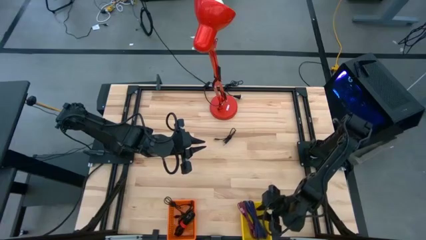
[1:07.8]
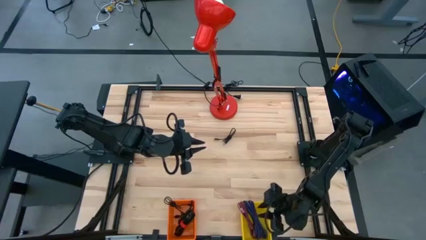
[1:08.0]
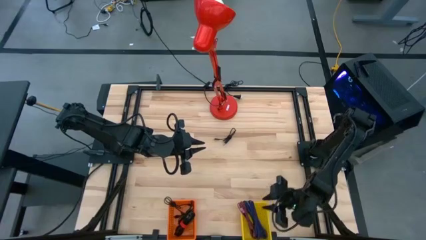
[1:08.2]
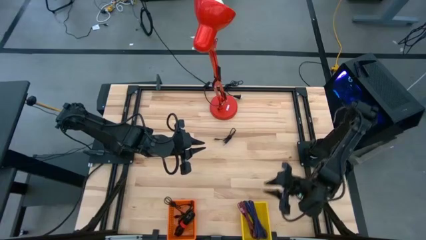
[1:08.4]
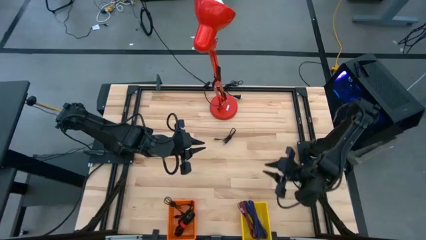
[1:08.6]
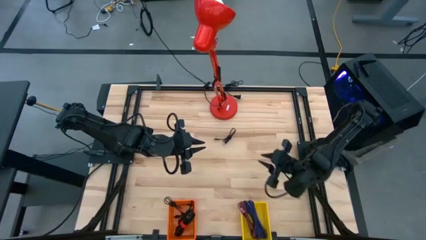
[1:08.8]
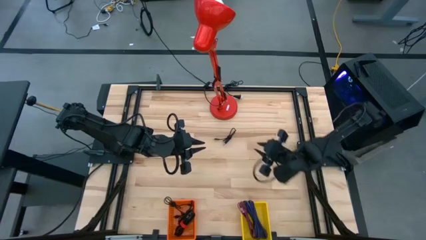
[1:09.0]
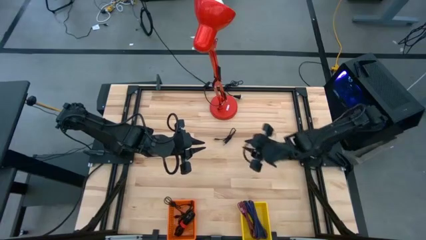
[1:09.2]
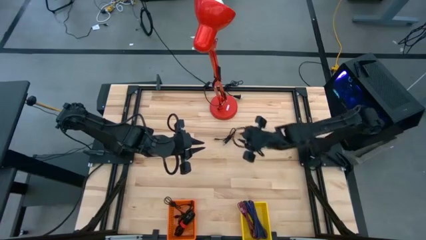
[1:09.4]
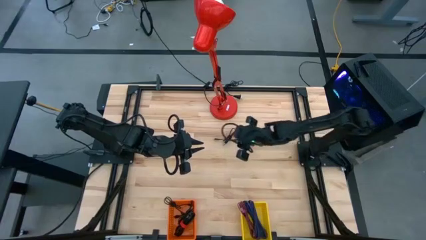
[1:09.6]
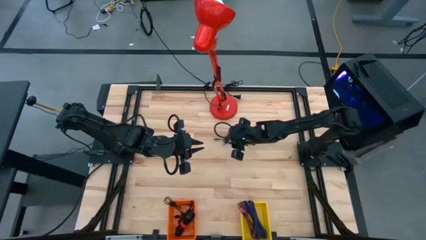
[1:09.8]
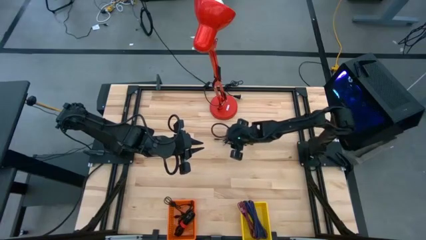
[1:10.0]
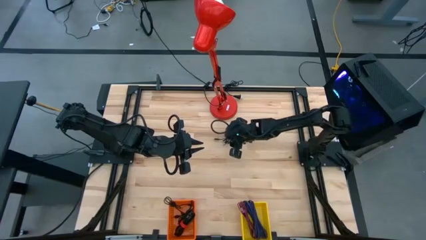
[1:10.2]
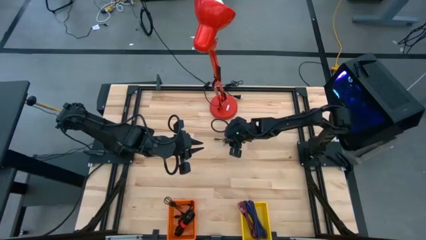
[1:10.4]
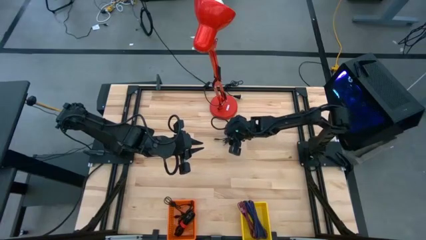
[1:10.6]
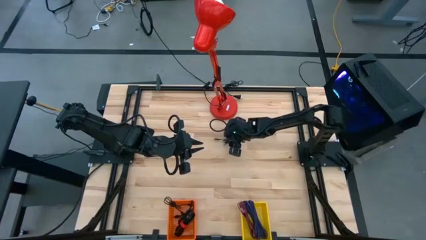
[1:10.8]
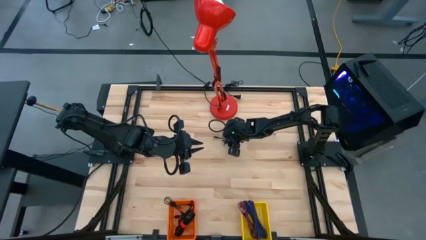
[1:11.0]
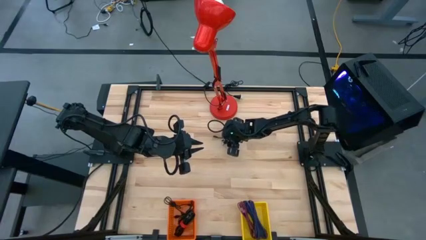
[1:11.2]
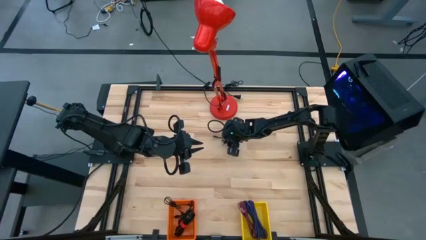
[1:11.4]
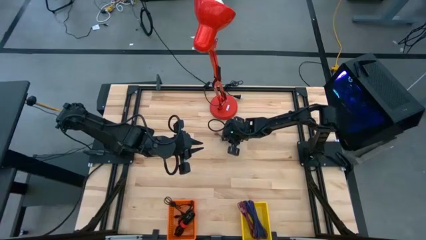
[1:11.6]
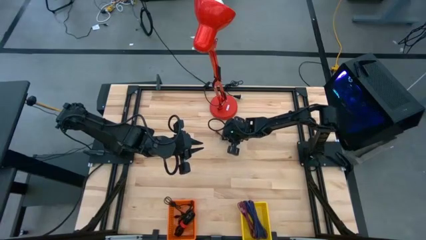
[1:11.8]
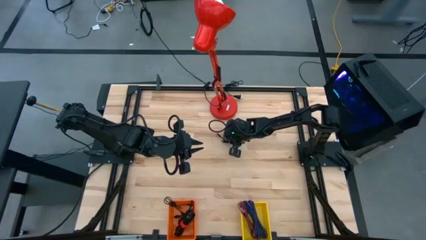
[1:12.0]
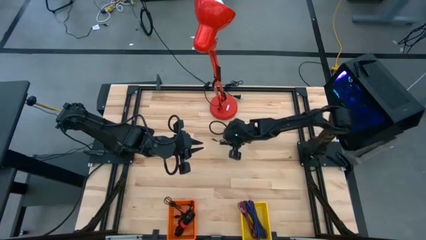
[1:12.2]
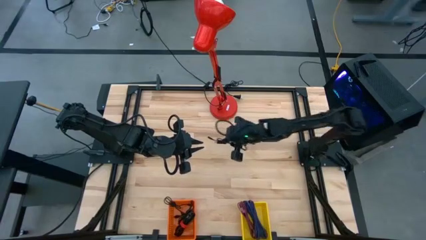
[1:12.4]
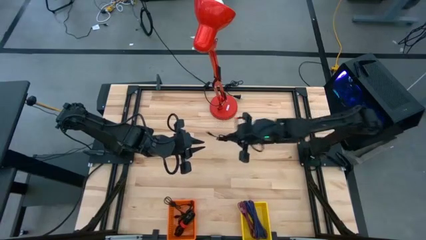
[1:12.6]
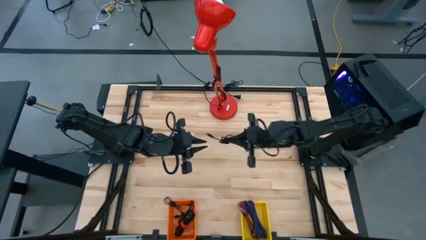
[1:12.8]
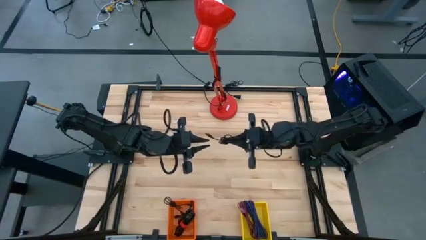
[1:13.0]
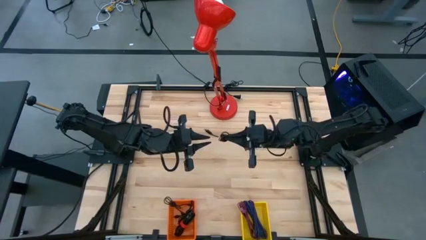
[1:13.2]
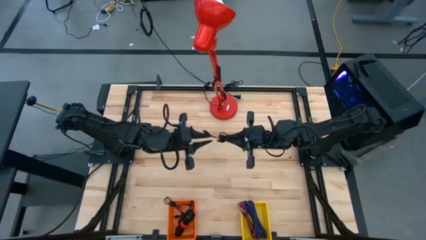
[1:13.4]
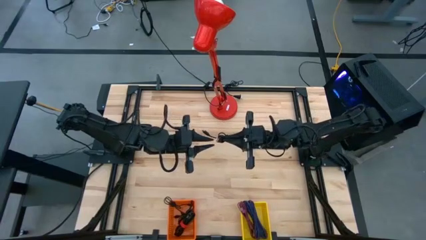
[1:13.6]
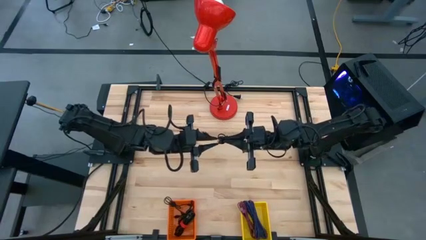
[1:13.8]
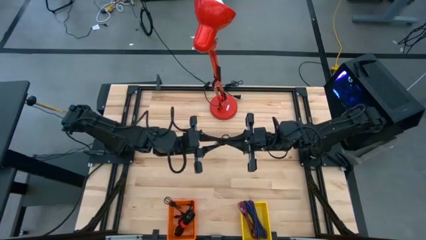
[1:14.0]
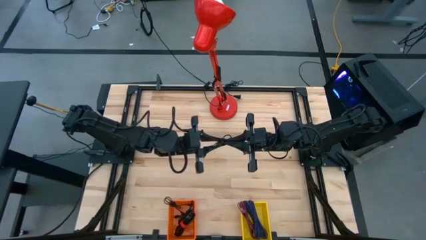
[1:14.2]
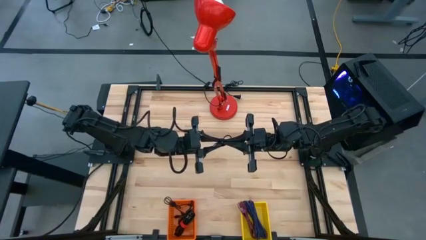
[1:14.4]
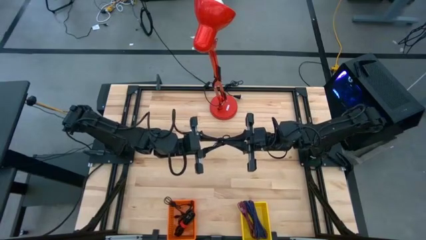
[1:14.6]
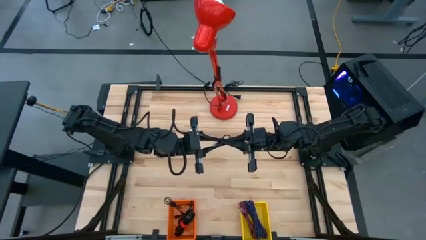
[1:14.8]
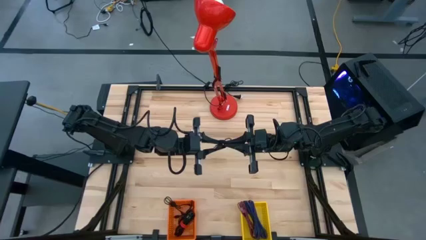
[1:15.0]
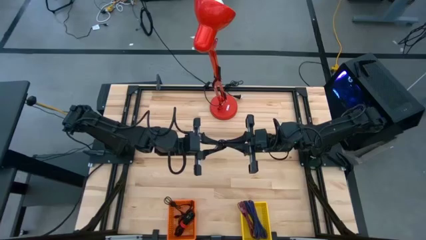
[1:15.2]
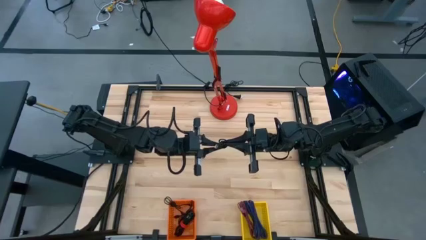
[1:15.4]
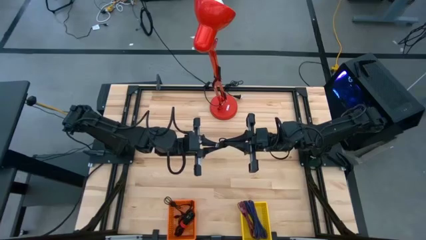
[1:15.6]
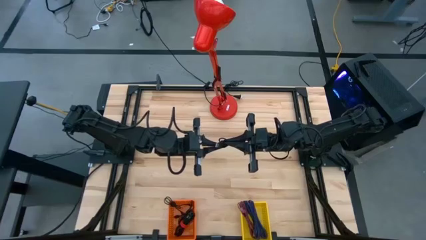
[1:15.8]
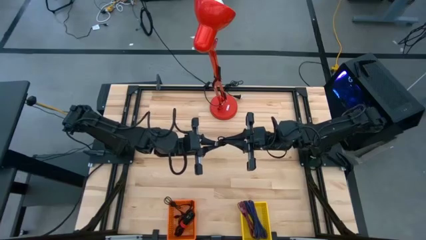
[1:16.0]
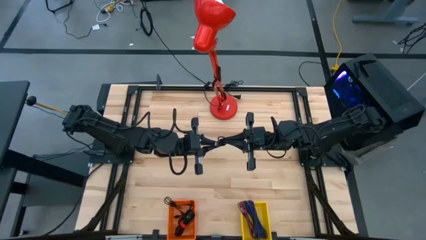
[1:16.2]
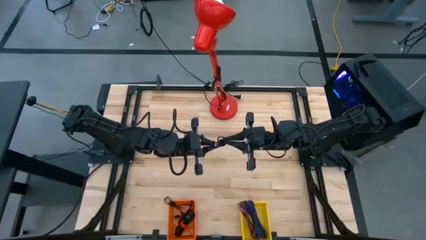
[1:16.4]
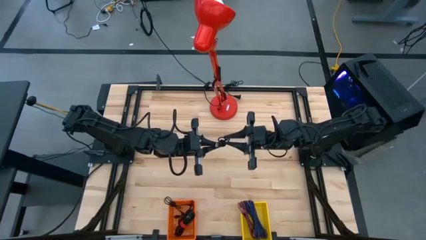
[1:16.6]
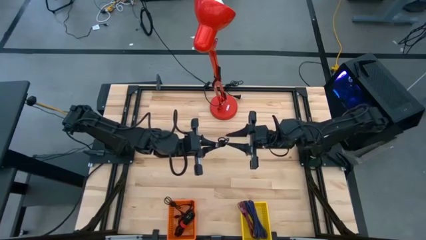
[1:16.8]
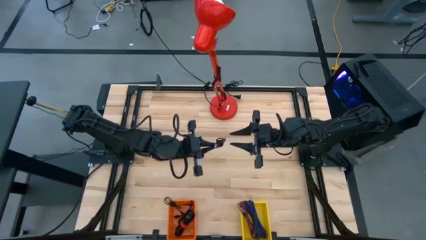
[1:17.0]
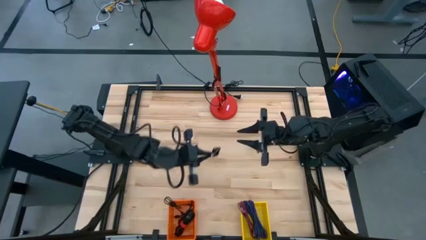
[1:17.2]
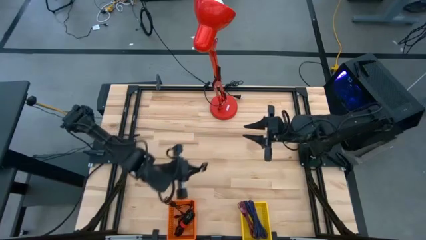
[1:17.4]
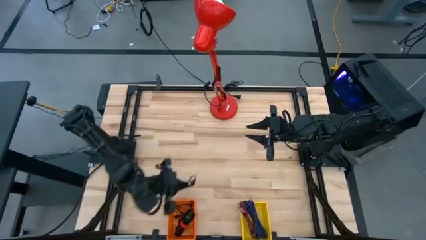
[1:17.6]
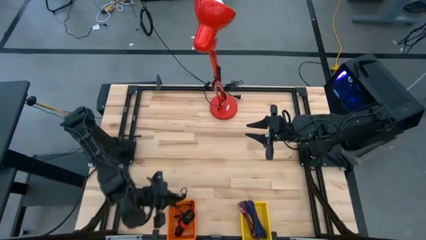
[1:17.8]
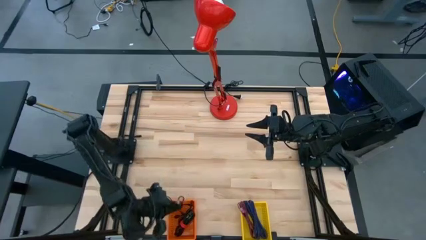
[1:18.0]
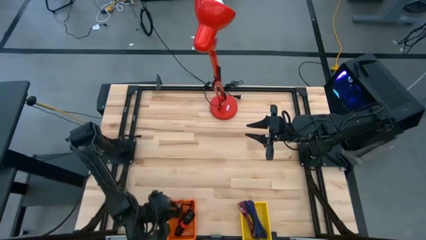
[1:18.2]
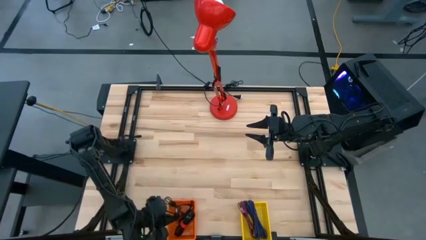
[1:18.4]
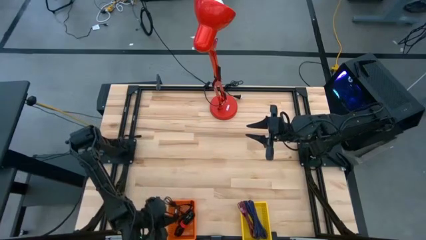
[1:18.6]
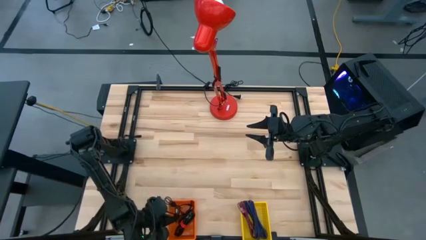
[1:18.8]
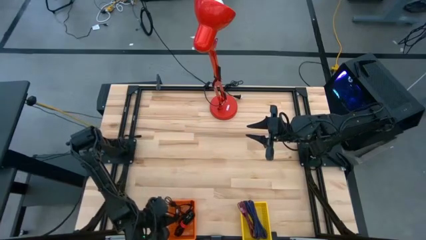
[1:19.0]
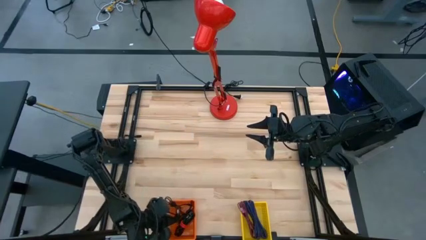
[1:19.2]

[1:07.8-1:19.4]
Task: Pick & Place USB Port
Put the black charger cable into the orange bin

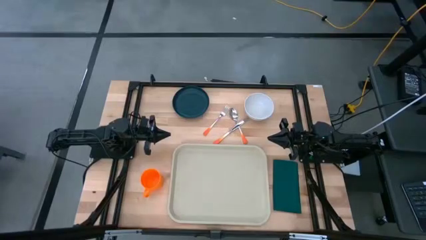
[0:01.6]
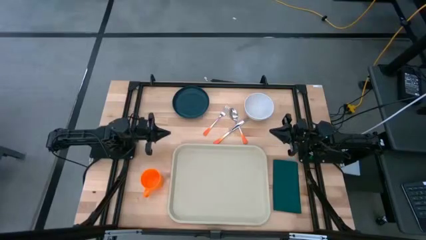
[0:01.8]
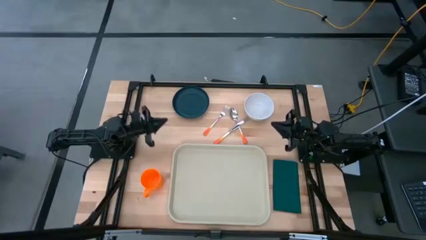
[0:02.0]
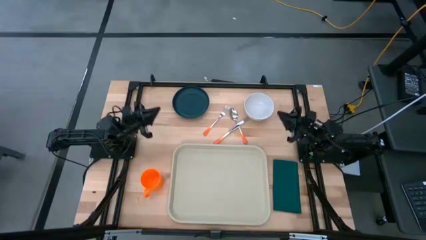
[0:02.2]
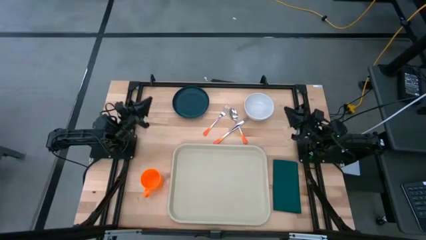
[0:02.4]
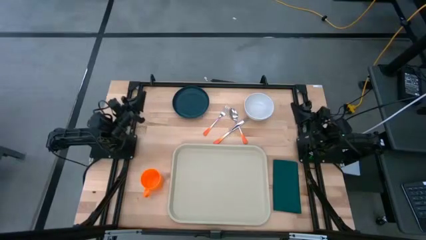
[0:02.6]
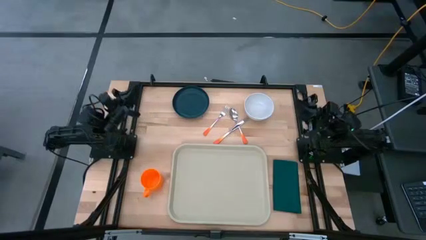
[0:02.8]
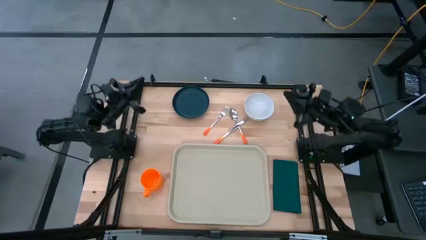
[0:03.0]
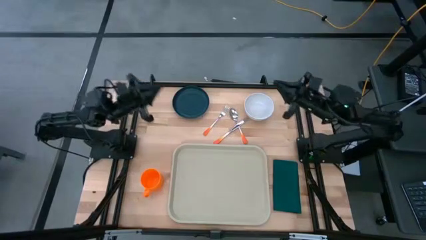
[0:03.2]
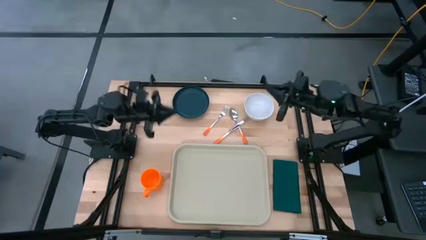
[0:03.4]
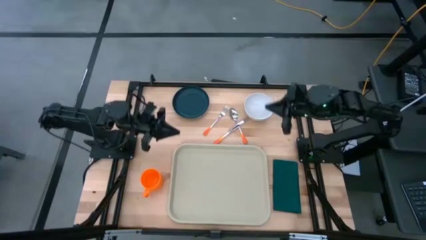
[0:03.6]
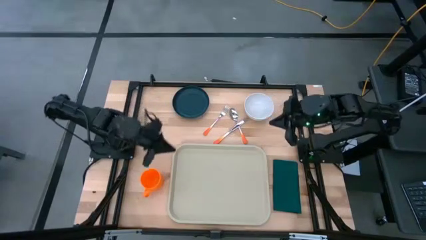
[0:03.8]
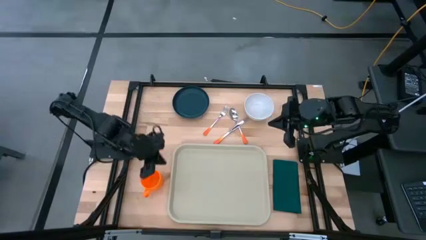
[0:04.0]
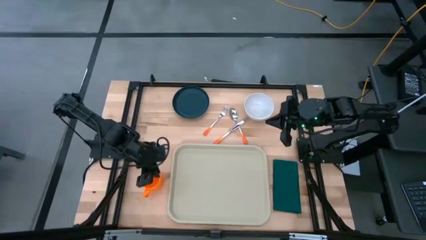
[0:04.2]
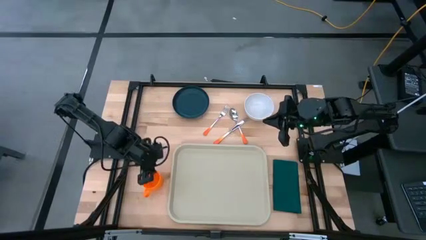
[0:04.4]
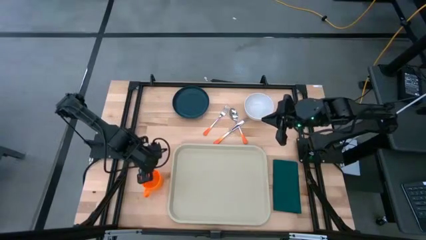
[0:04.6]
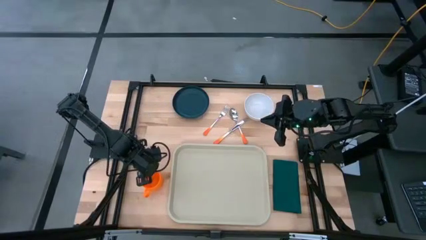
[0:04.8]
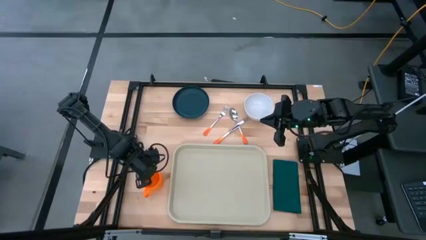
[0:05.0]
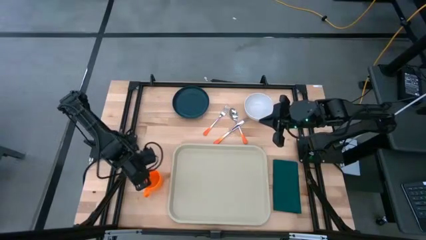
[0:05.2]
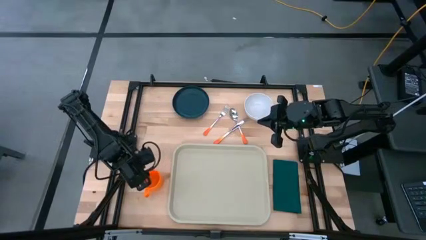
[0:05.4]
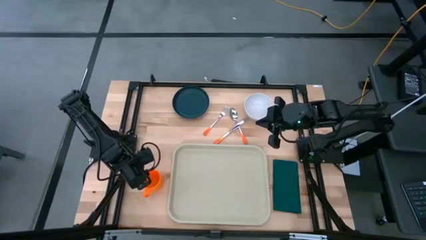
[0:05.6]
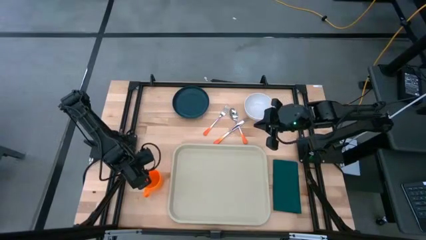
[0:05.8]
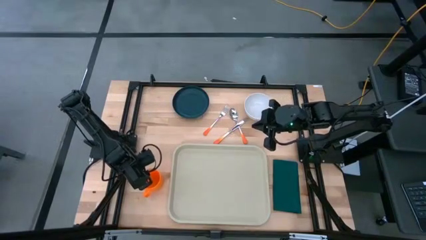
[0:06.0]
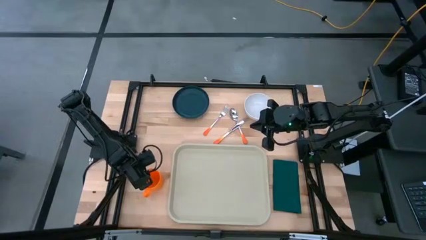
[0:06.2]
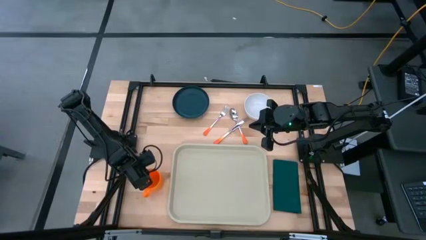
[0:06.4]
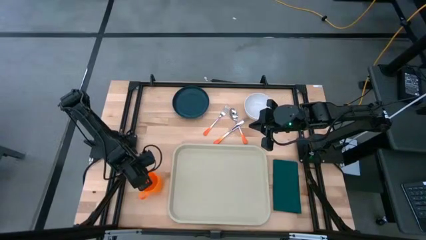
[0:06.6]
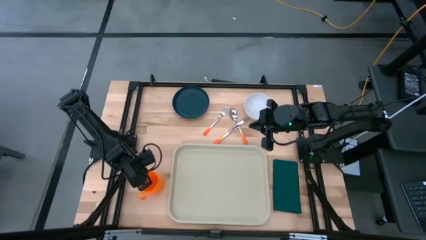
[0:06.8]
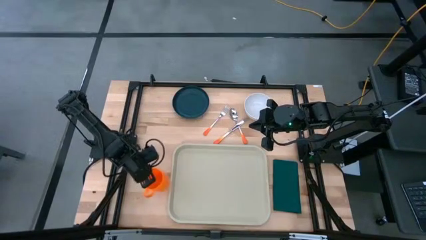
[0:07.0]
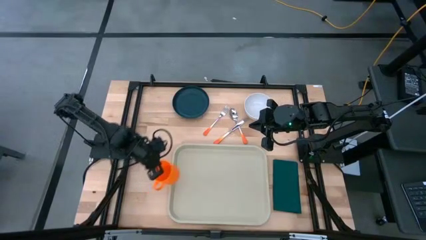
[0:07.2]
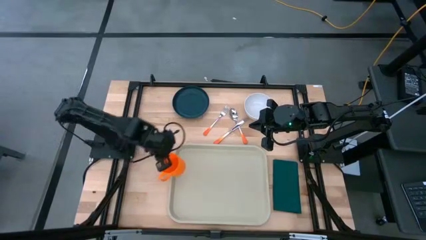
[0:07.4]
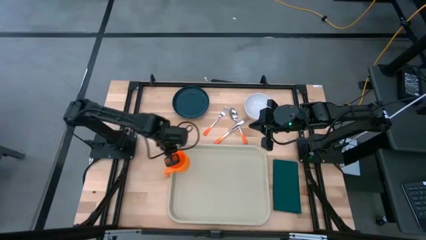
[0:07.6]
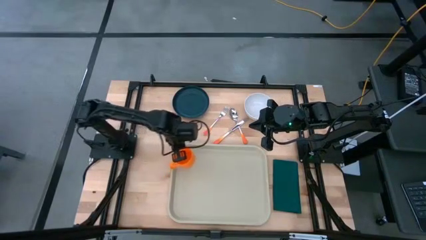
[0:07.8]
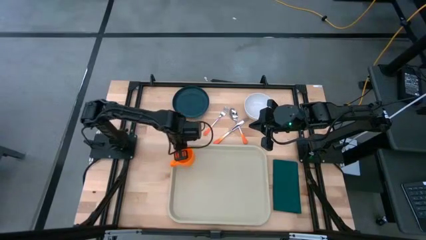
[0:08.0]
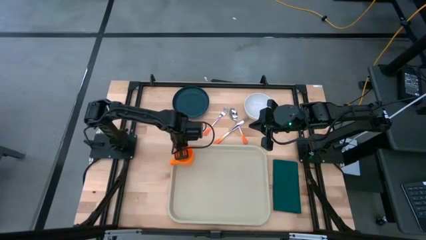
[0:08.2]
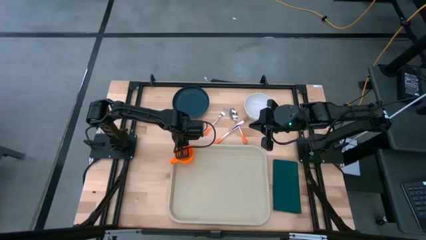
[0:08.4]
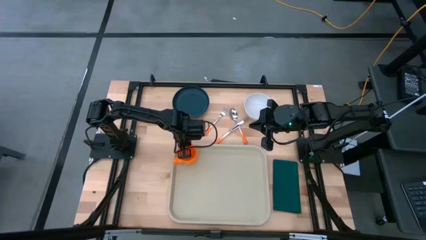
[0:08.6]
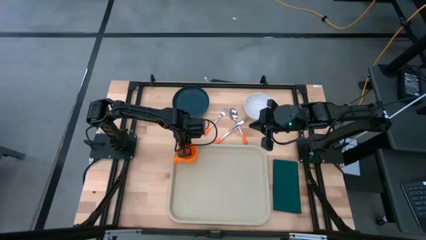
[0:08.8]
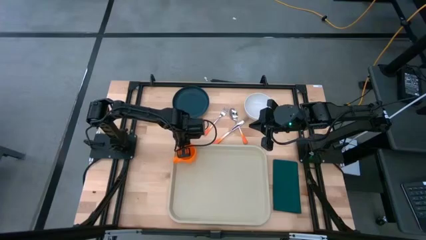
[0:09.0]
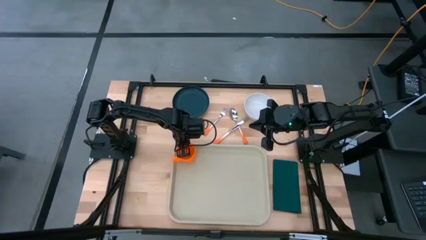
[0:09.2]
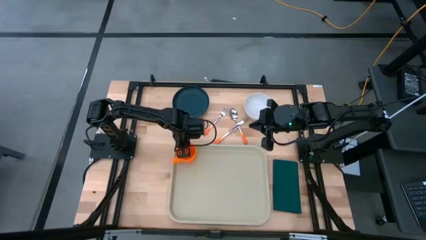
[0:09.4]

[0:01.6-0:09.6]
Task: Set up tray
Put the orange mug on the brown serving tray
